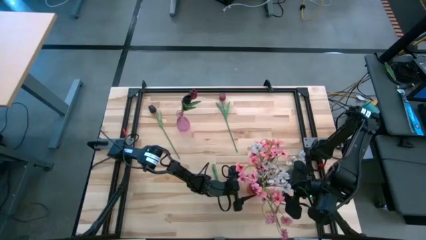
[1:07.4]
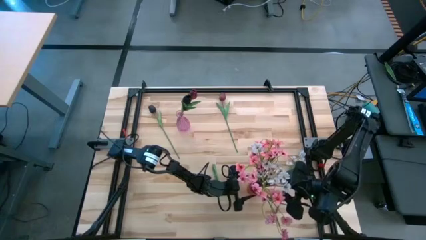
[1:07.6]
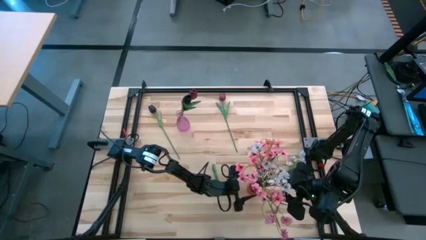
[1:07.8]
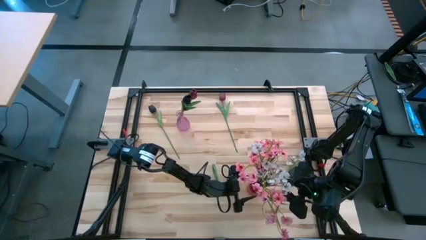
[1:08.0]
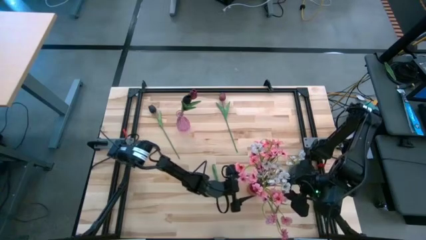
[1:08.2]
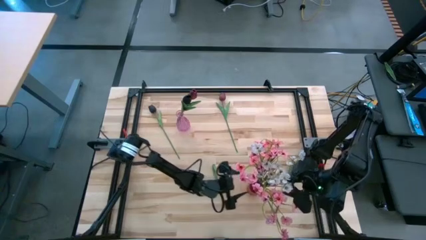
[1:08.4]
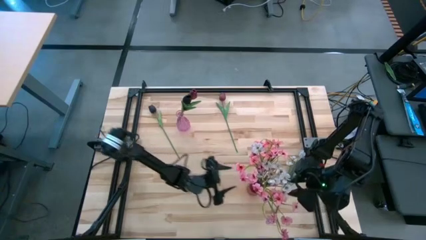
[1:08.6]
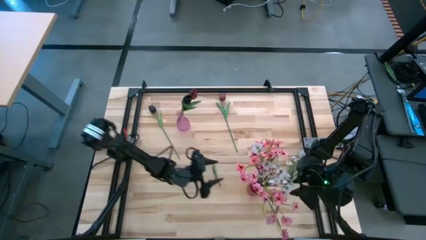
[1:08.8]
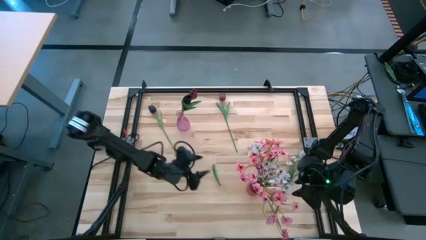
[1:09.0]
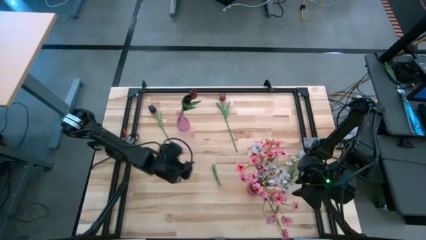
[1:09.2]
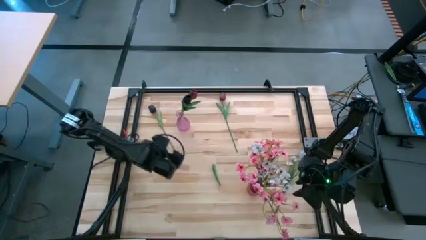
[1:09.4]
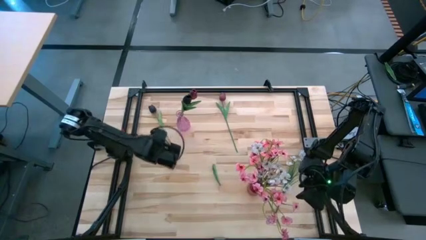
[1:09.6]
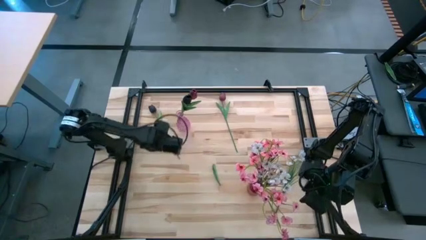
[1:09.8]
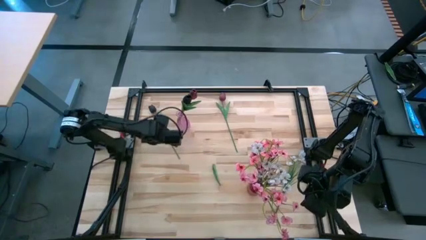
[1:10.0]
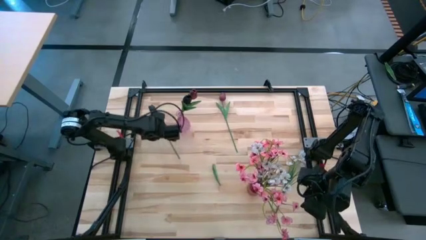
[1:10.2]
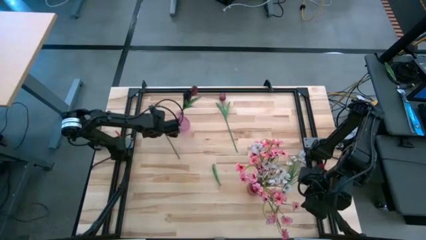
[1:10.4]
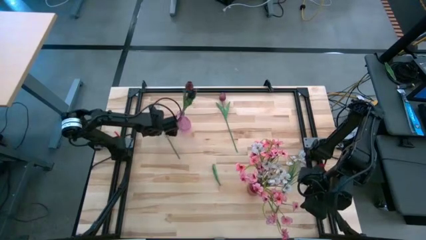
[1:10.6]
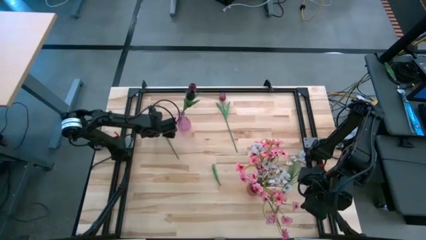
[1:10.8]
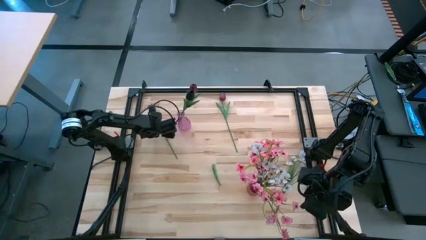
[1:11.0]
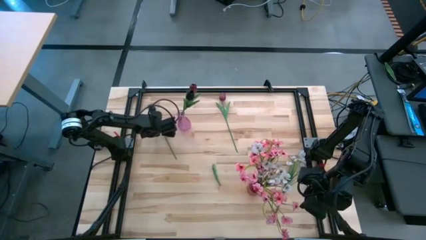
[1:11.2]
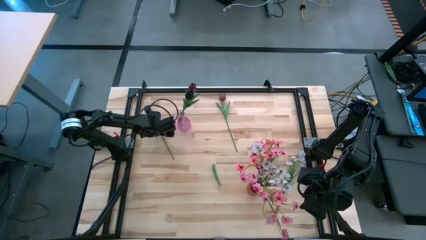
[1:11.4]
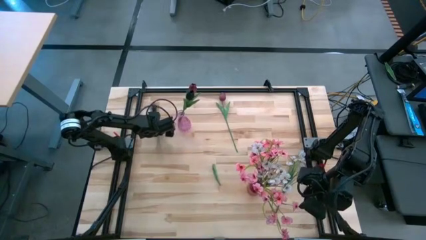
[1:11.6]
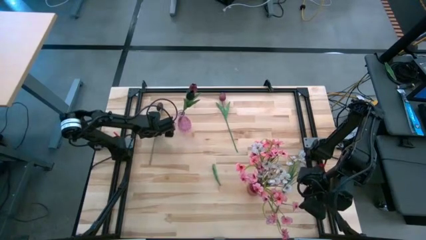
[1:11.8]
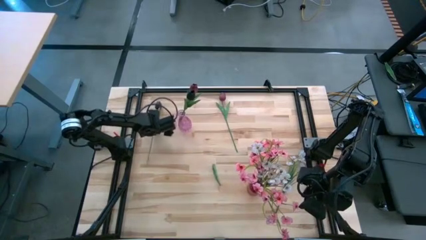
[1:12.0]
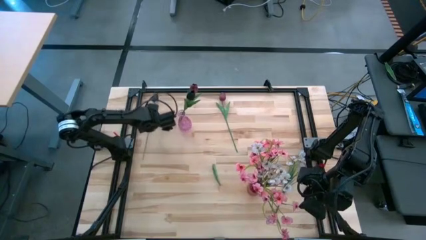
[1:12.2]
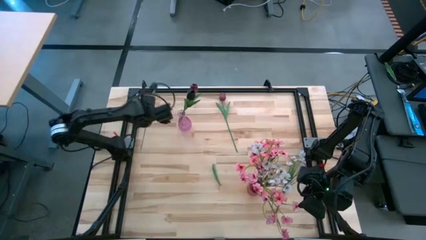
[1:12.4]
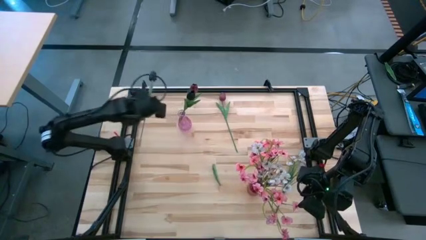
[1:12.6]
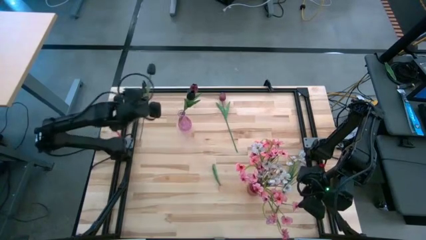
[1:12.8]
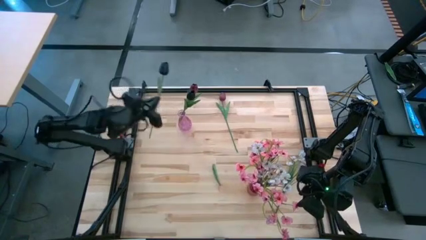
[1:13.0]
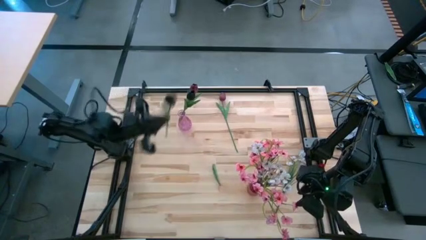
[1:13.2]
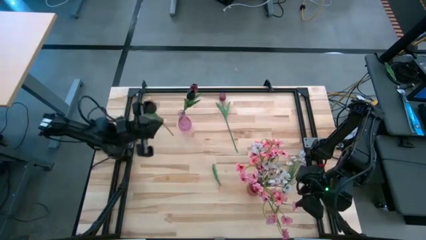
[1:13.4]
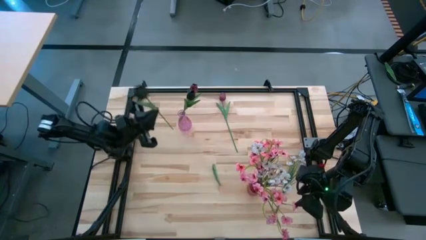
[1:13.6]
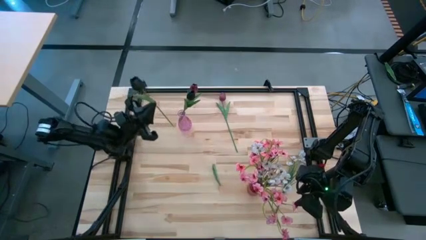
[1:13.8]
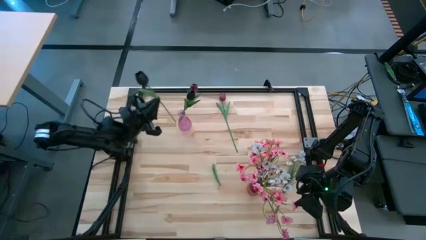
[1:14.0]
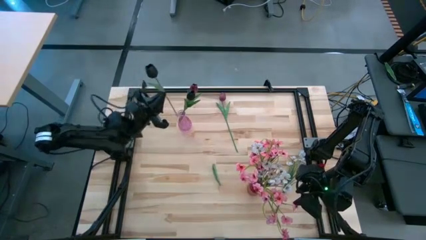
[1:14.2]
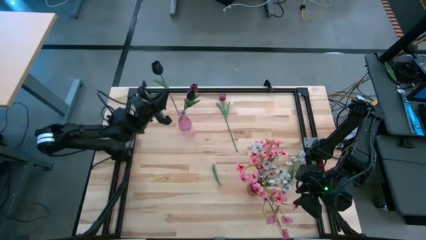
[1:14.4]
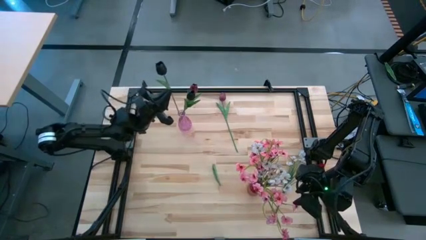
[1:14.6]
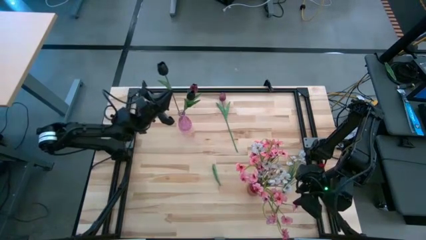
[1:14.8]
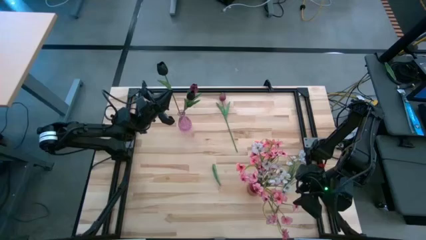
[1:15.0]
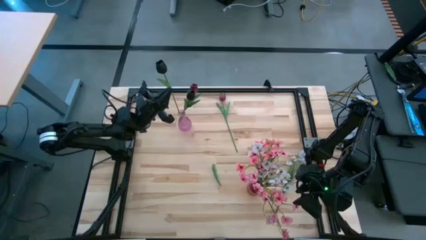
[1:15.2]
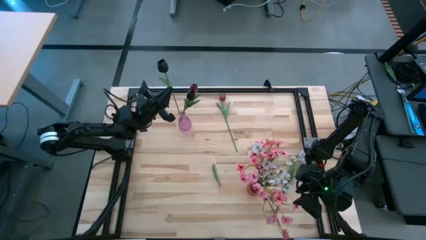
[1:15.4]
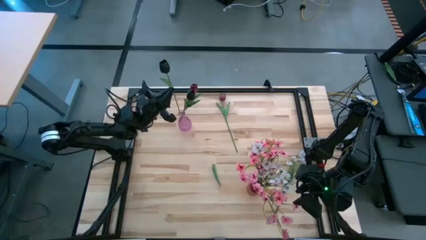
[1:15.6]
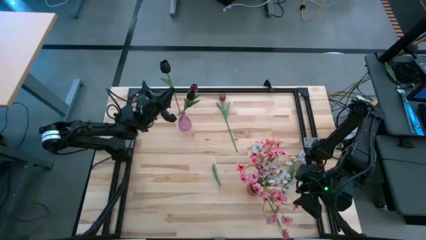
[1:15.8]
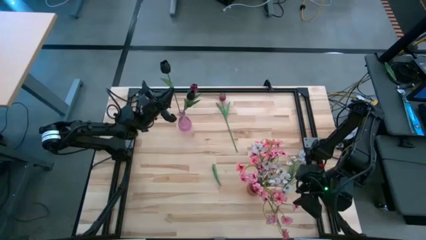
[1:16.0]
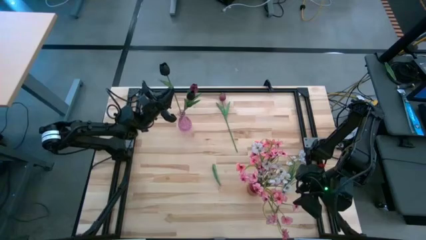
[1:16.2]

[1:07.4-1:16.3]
Task: Sort flowers into vase by color
Put the black flower into the purple vase

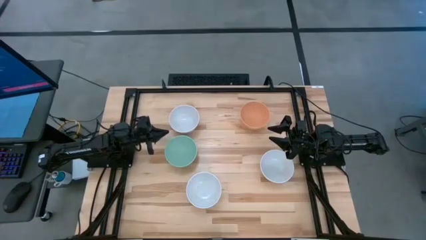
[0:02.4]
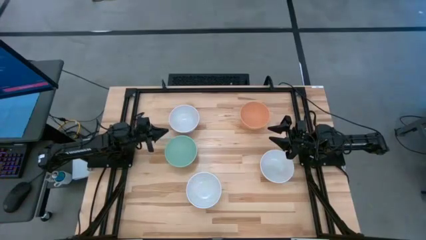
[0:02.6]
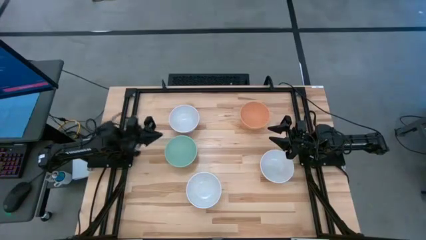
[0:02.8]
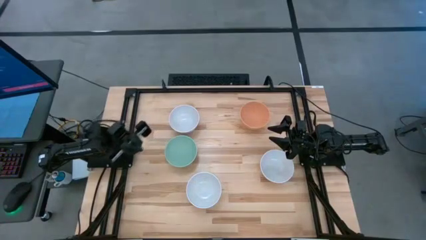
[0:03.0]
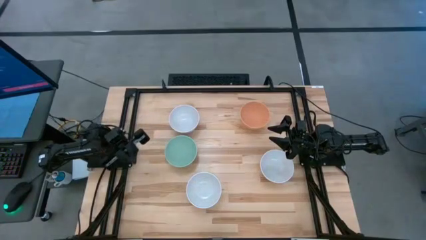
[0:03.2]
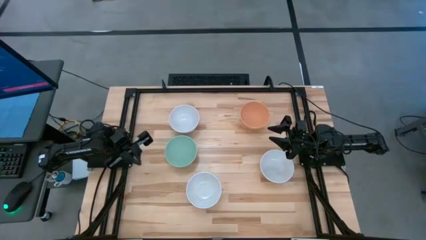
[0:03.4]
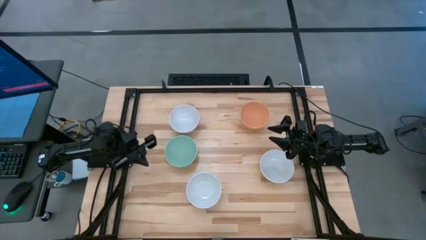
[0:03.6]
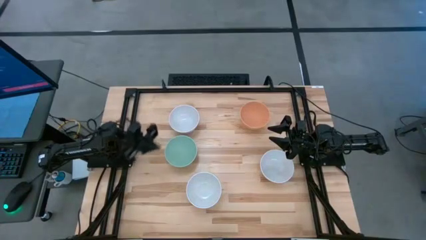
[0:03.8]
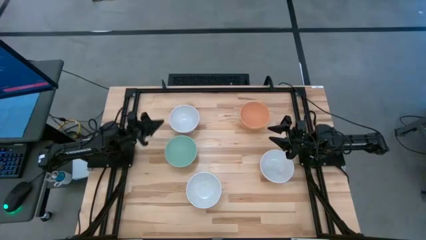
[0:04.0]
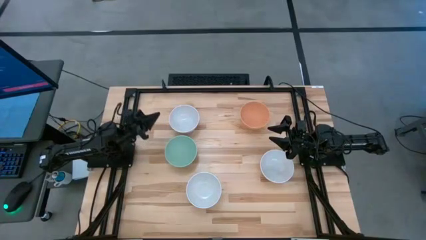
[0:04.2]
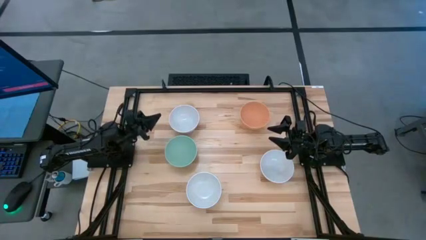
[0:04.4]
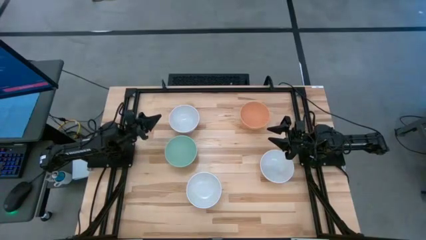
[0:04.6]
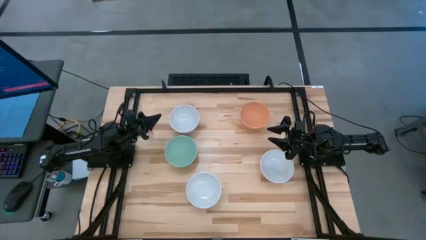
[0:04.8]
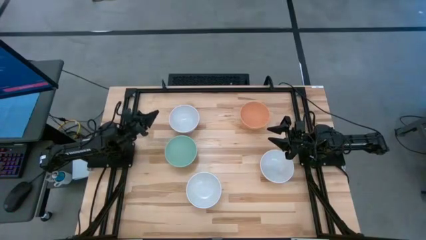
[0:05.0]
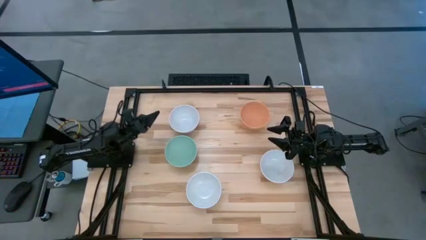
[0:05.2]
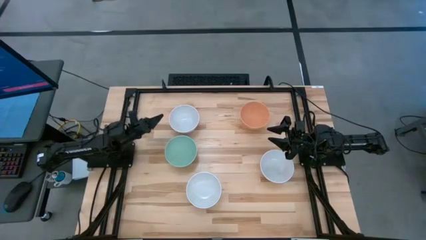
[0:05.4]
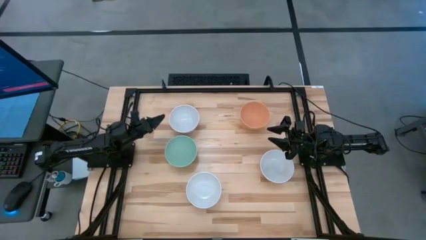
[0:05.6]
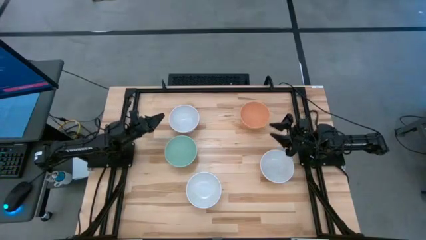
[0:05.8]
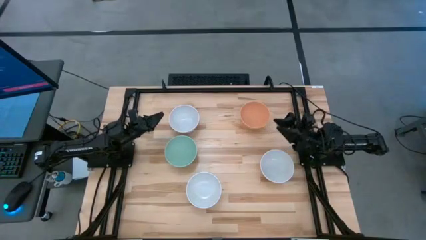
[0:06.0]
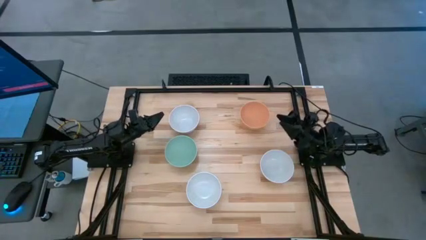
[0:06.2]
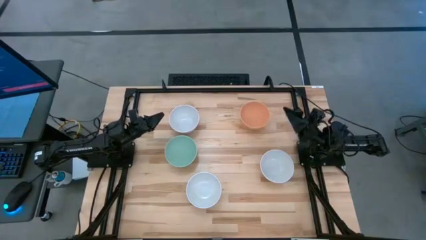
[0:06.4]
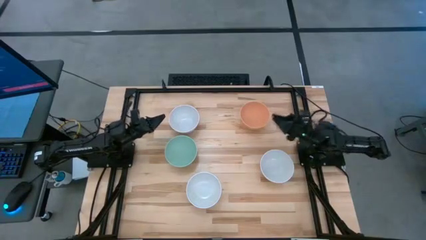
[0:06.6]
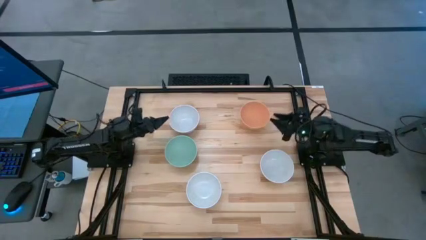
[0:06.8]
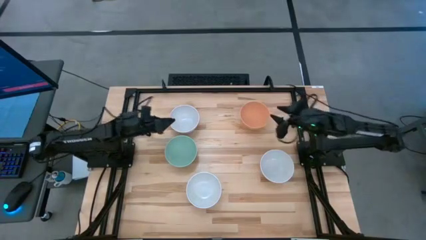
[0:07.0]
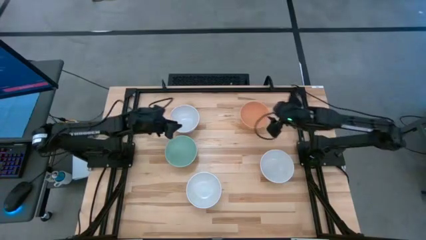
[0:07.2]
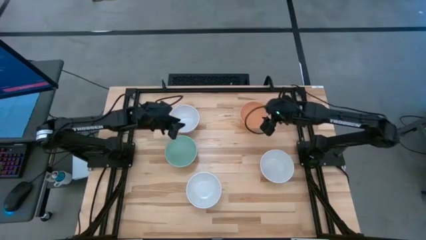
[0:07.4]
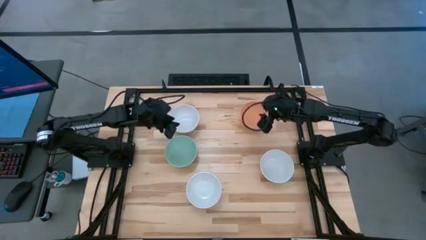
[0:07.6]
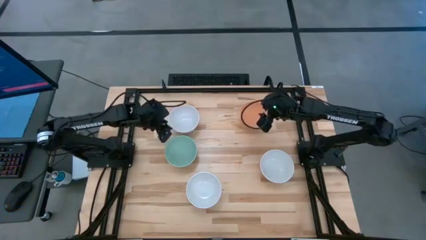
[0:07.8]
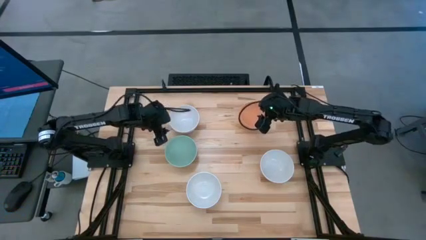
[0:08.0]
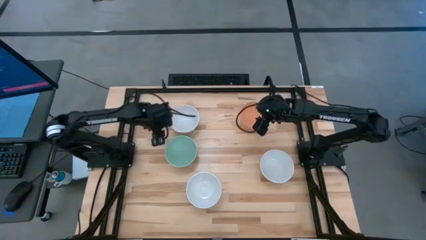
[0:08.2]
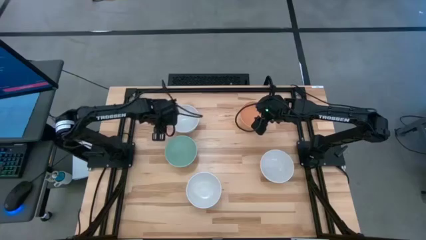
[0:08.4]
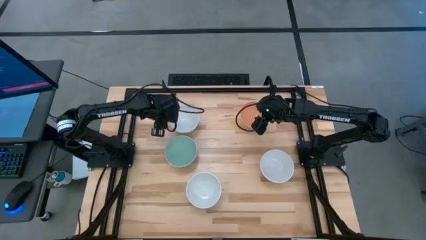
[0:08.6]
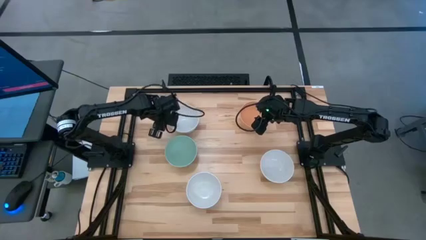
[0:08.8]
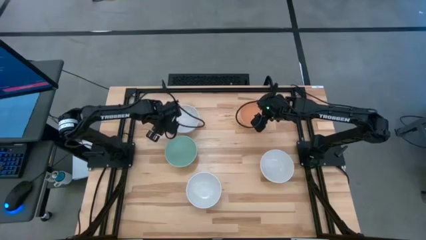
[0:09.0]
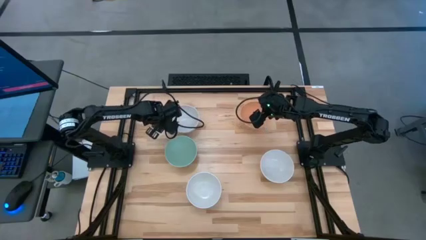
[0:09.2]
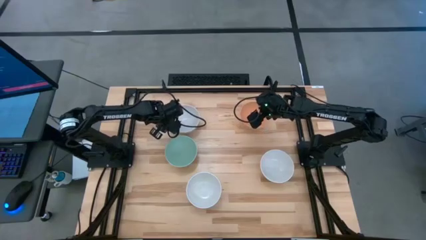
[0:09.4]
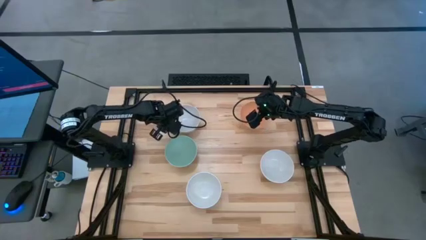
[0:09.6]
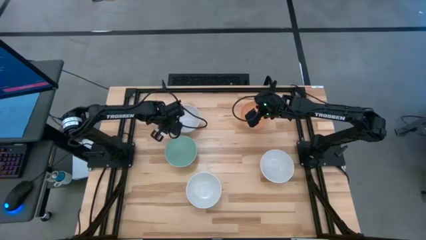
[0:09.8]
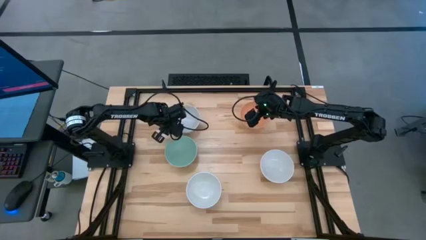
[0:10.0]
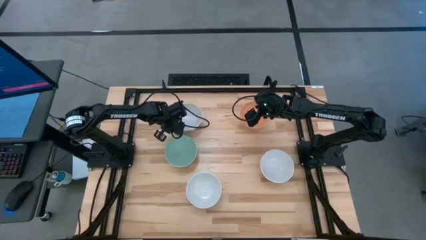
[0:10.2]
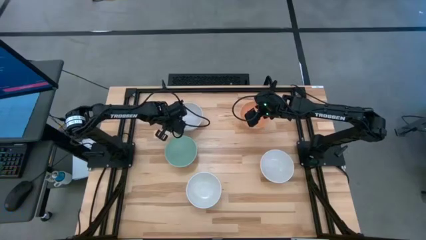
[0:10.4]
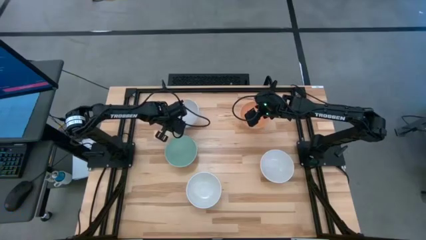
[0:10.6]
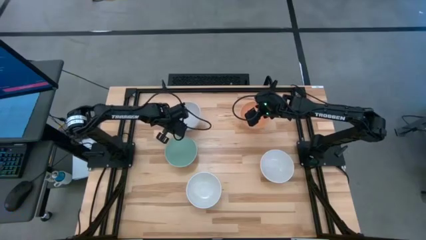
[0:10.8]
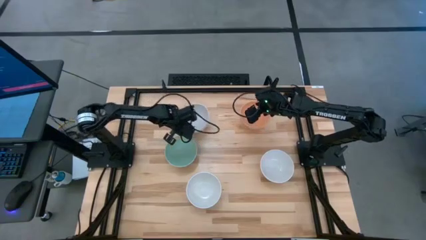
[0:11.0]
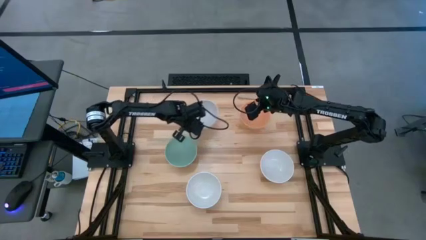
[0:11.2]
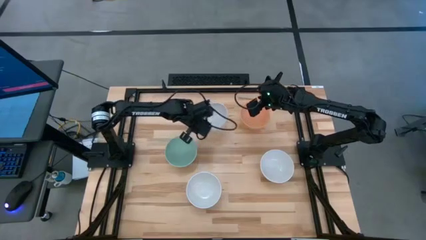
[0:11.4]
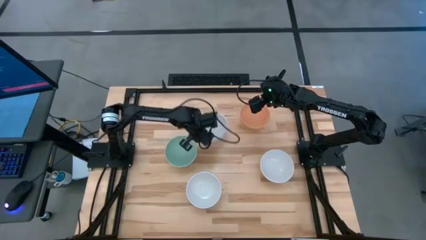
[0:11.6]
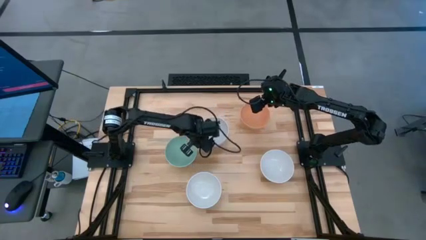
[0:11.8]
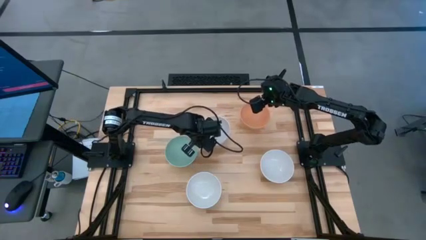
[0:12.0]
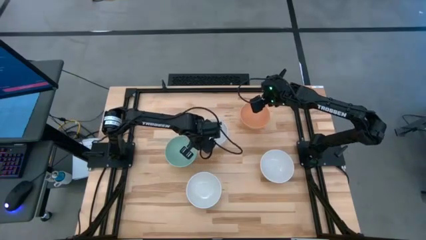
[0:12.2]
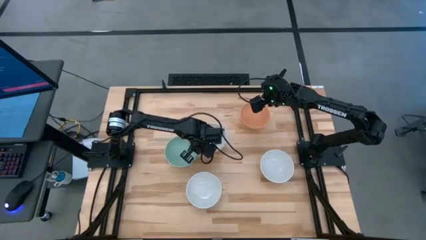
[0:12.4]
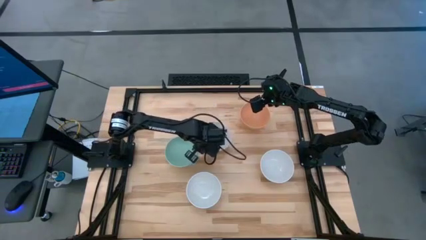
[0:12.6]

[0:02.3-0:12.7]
Task: Nest bowls inside each other
Move the top left white bowl to the middle of the table
